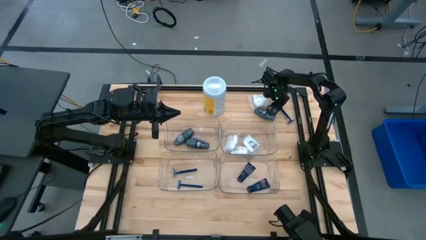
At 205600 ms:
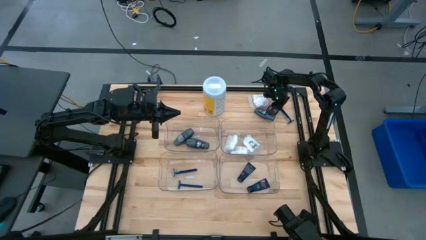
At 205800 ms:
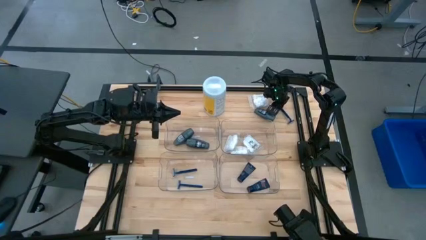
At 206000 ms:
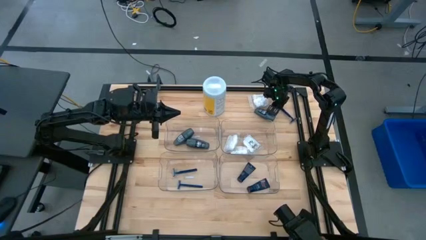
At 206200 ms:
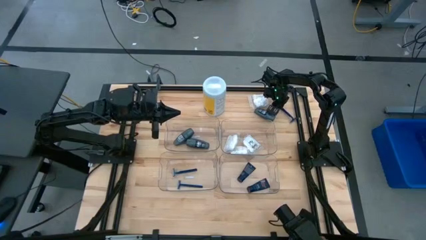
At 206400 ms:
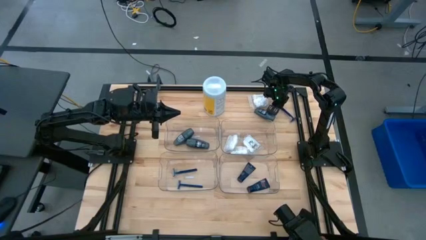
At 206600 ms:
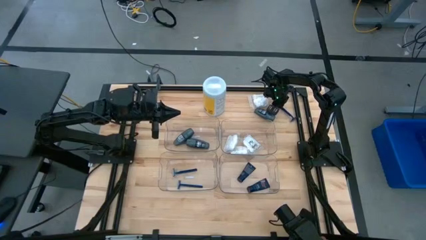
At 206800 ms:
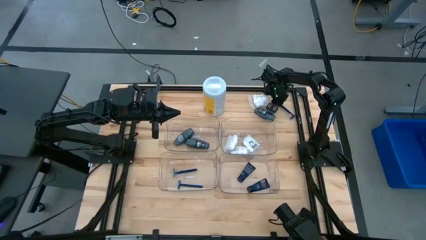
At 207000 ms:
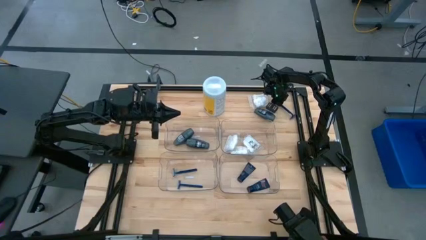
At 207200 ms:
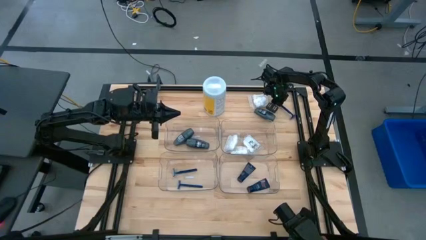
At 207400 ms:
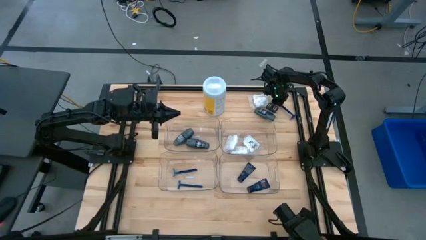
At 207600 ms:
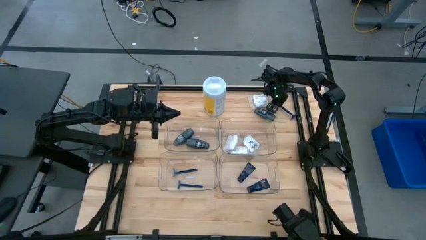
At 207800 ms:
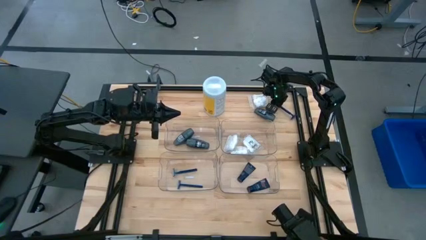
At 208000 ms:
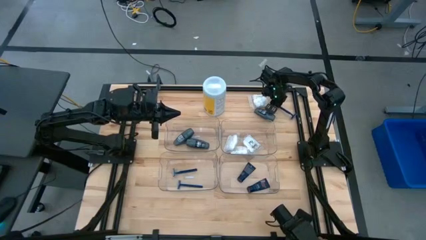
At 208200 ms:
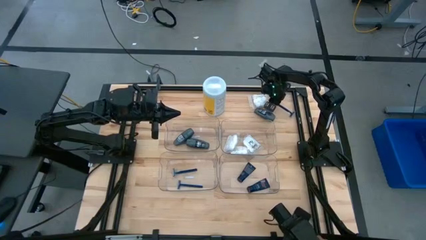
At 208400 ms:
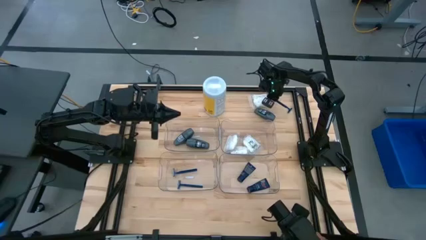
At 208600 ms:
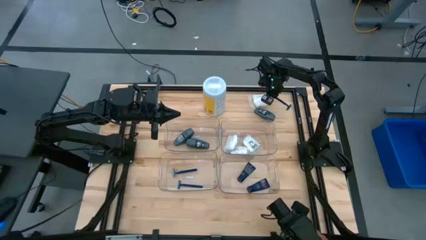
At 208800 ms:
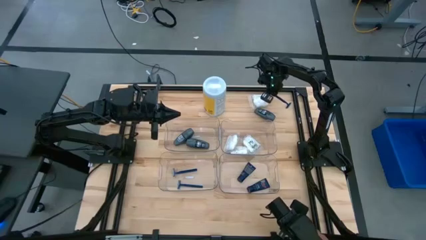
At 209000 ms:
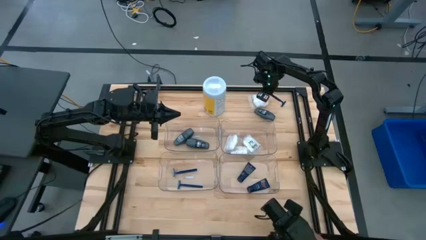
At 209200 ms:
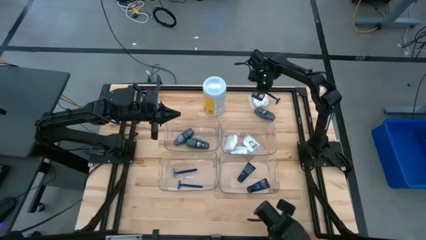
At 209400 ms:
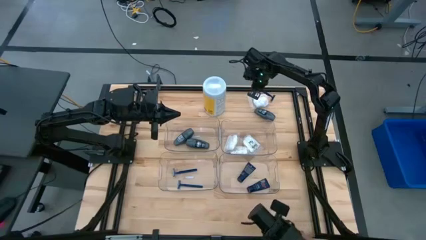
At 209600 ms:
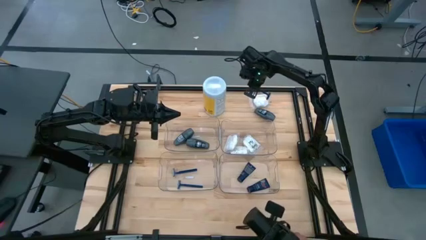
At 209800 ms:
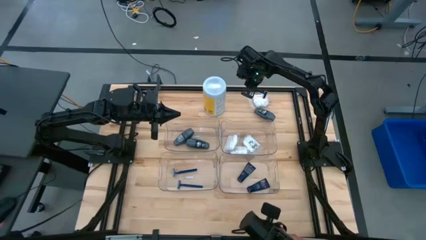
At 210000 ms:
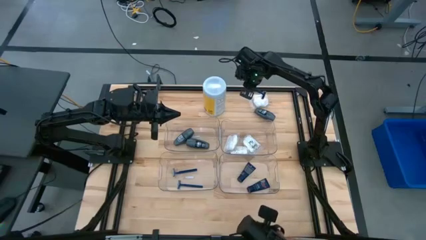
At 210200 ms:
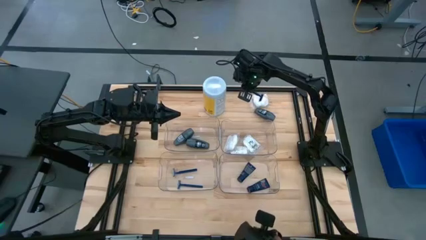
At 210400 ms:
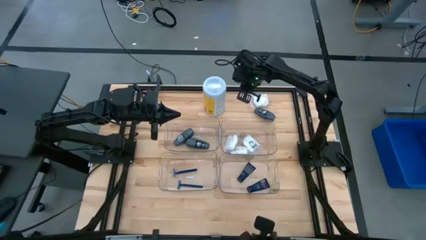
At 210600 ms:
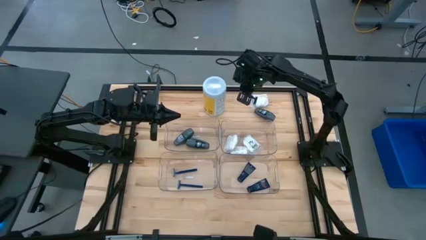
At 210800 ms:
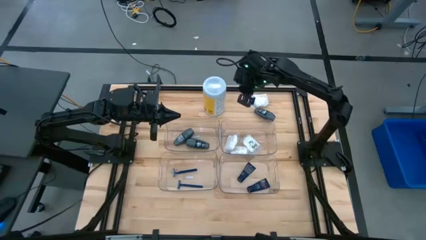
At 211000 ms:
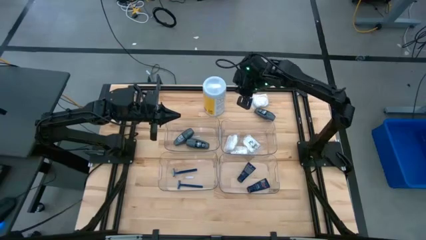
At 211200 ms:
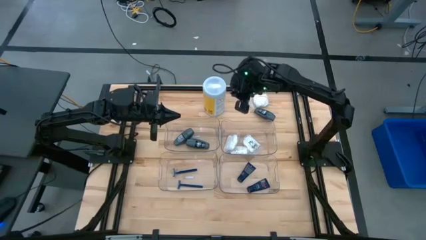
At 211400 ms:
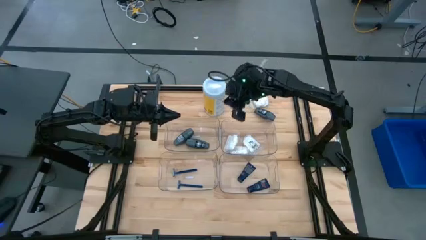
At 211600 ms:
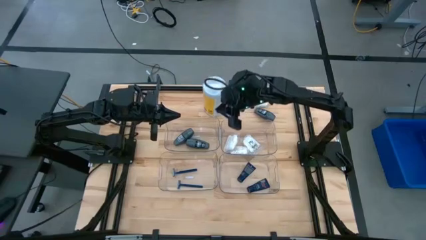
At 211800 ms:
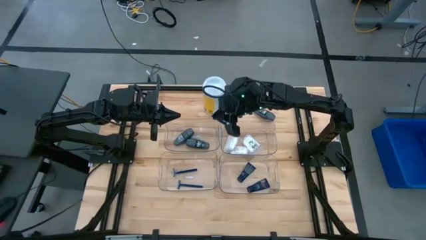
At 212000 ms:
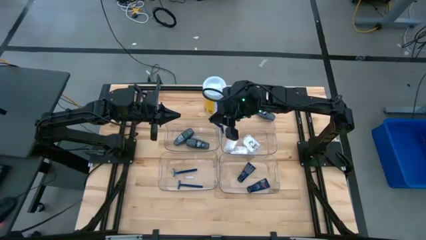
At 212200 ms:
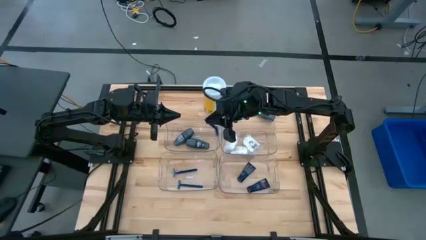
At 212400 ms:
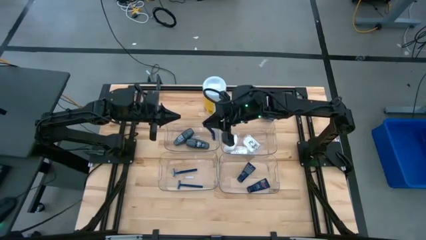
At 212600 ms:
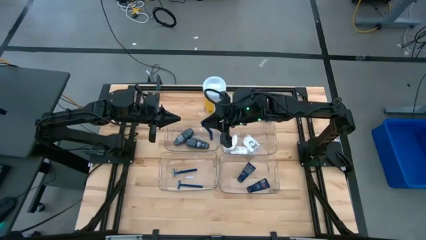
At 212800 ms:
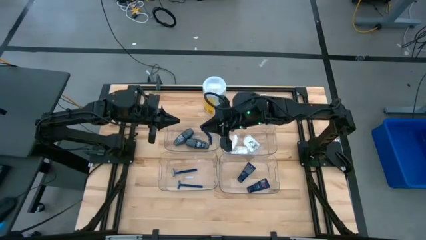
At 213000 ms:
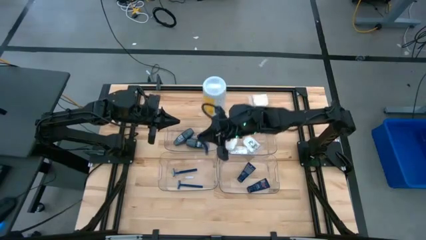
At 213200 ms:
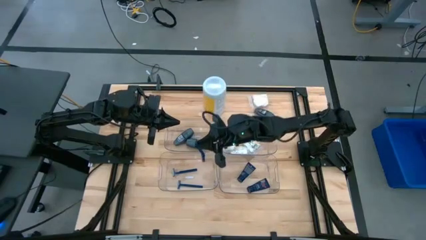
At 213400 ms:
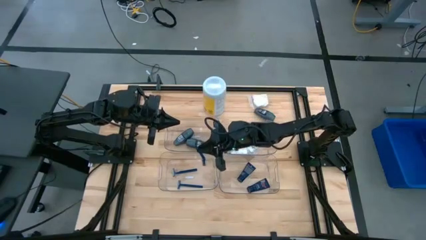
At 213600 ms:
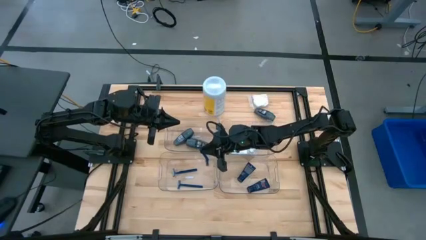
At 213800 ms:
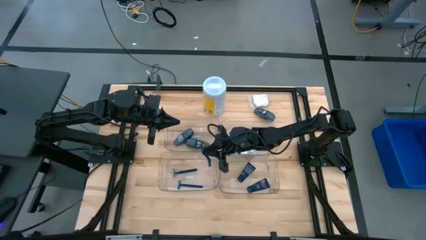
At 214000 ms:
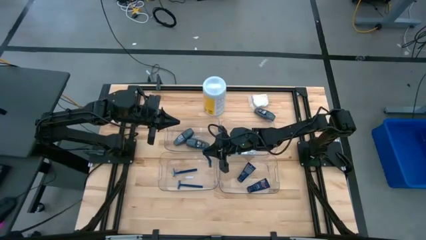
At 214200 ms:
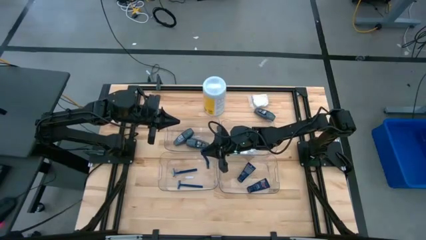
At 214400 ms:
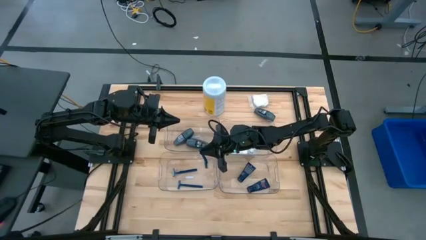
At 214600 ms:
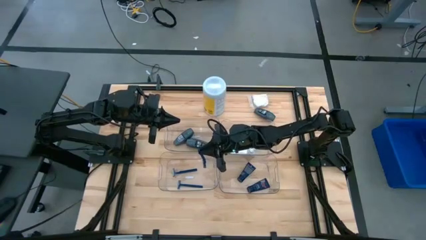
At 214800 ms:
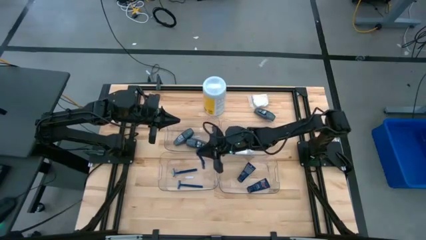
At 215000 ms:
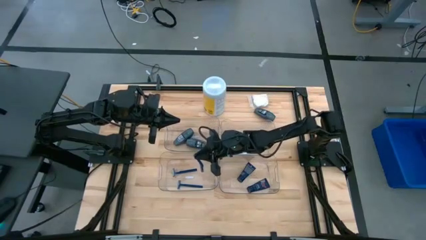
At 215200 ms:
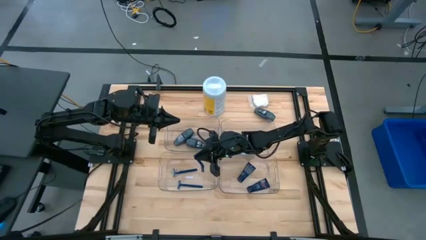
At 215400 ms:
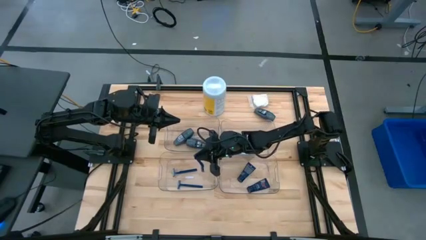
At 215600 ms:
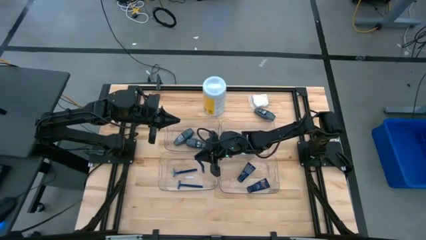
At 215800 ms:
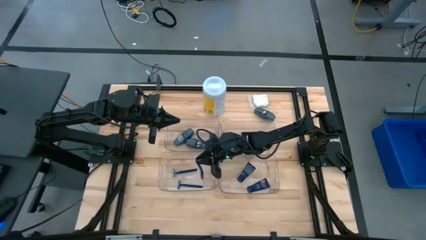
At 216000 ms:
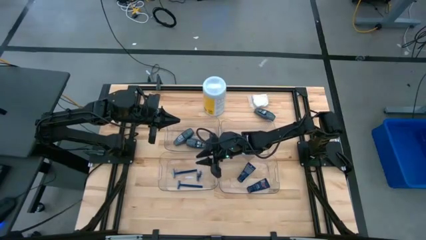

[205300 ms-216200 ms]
Task: Pick & Place Travel size toiletries
Put the blue shaver into the bottom left transparent bin

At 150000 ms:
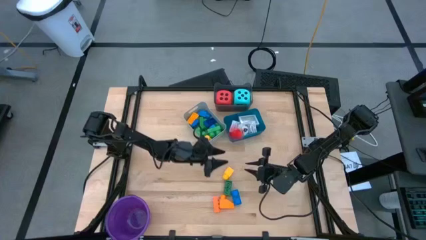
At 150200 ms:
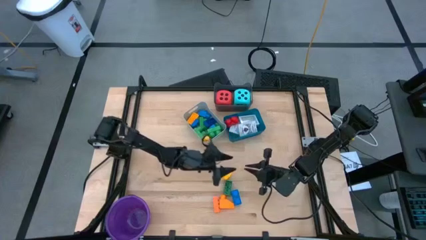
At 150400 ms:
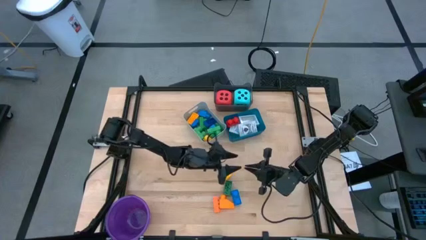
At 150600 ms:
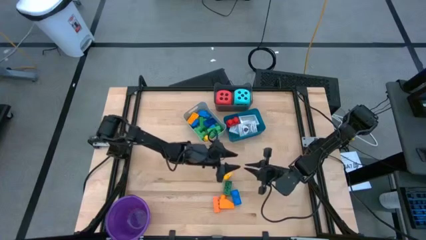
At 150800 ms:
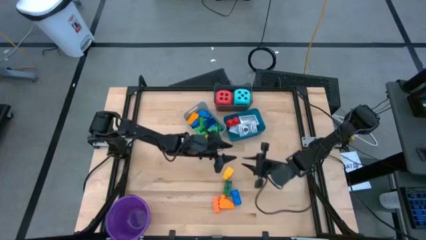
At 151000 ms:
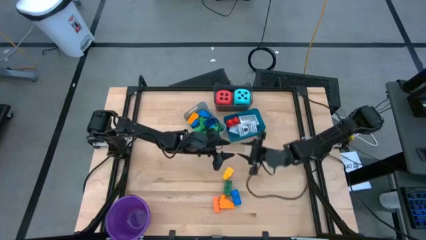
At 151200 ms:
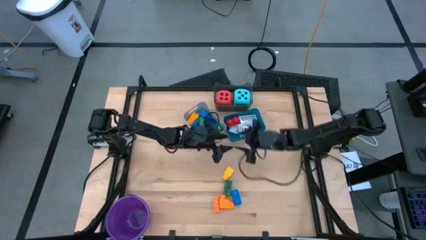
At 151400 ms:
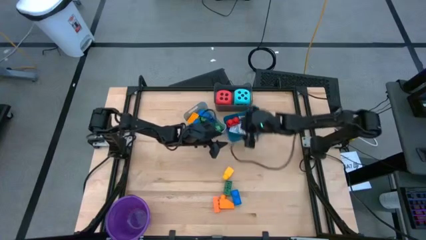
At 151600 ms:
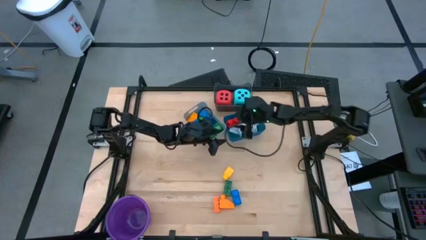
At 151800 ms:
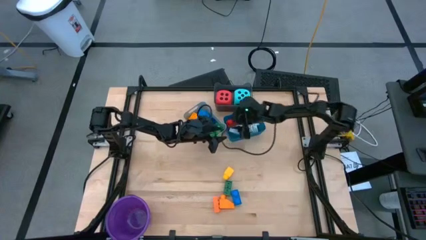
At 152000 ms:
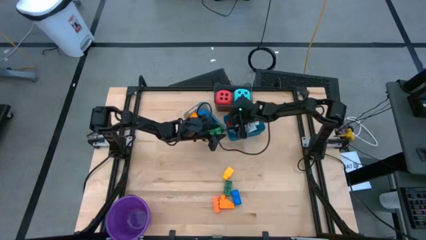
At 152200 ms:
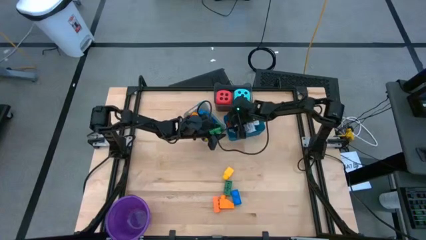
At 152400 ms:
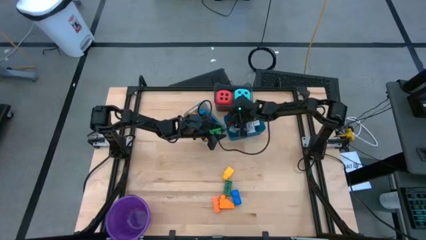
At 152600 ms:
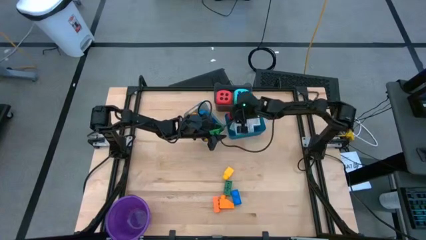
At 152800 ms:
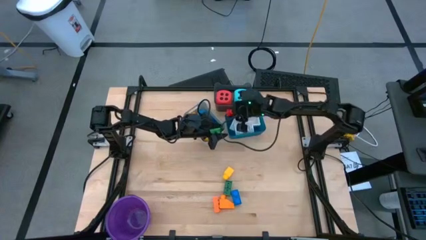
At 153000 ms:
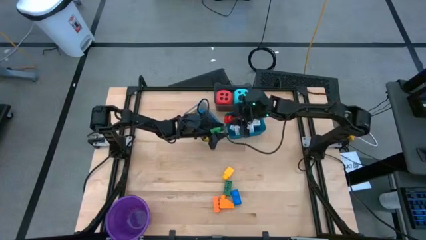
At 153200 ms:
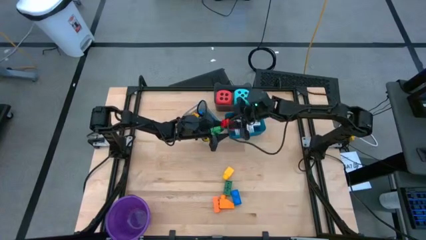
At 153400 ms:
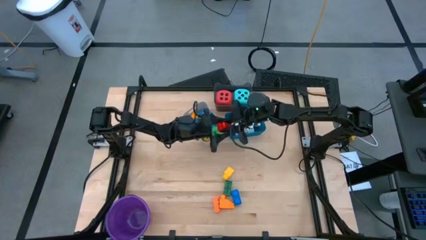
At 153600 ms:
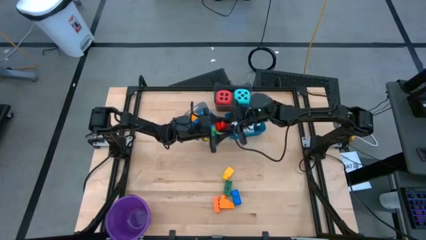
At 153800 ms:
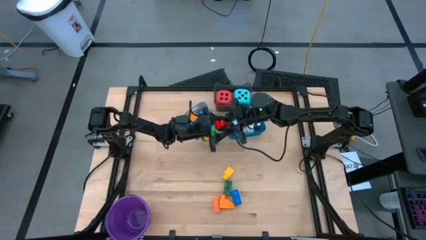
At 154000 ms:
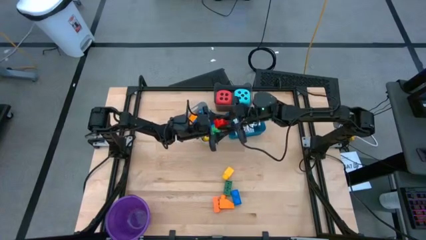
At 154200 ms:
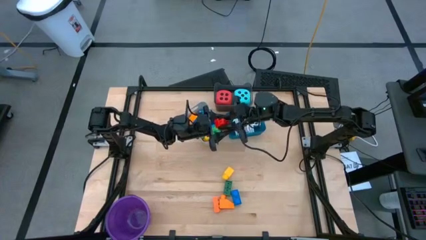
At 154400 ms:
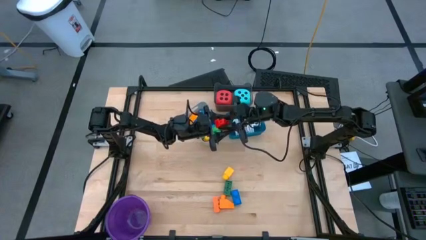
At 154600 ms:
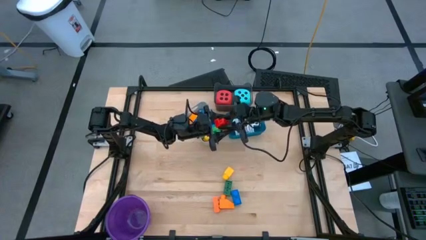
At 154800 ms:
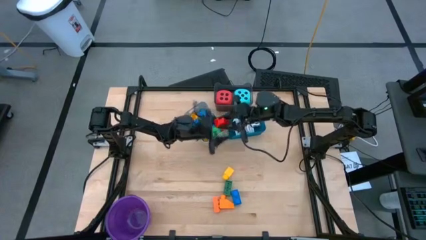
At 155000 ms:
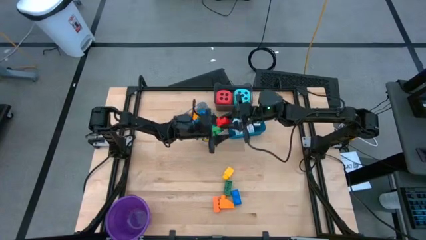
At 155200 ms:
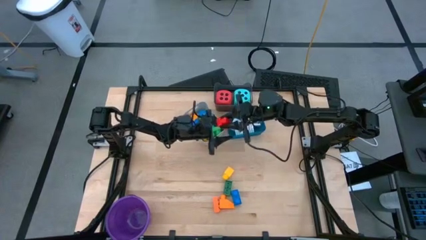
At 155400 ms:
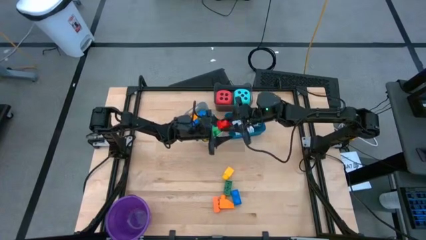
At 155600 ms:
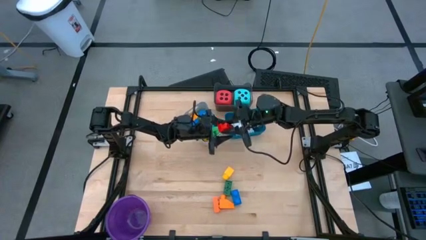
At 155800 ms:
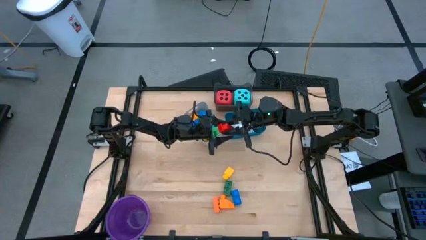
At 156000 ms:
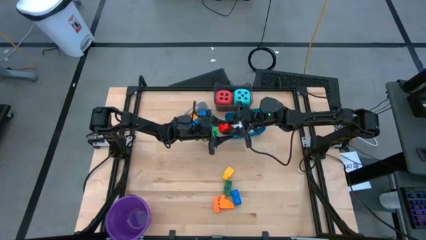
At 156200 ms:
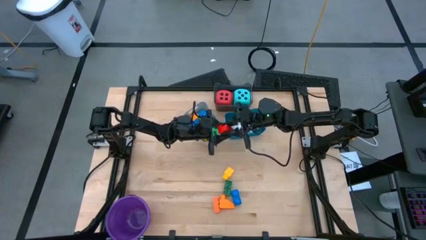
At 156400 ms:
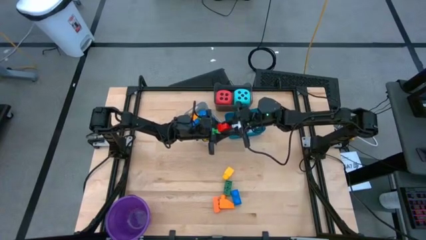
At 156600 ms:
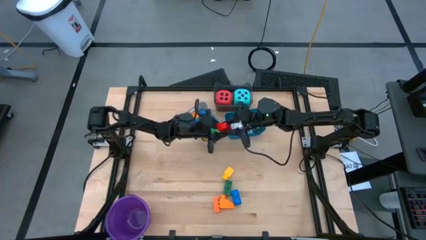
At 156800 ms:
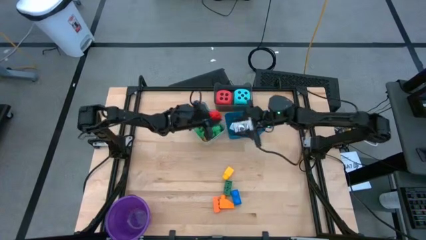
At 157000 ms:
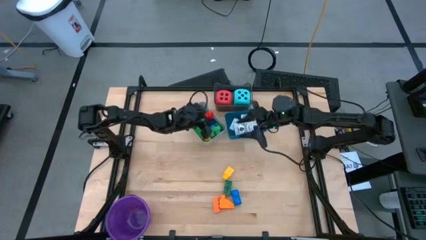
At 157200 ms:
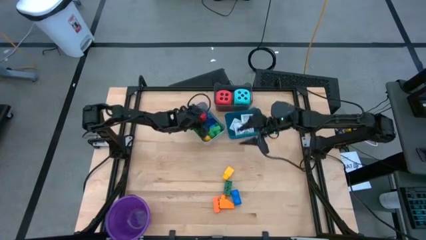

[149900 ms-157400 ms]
Task: Pick & Place Toys
Put the red game piece into the gray bin
